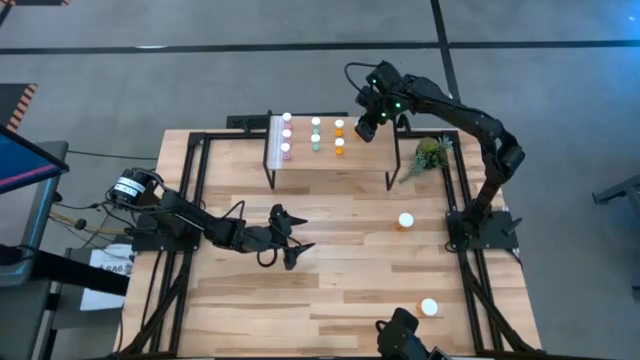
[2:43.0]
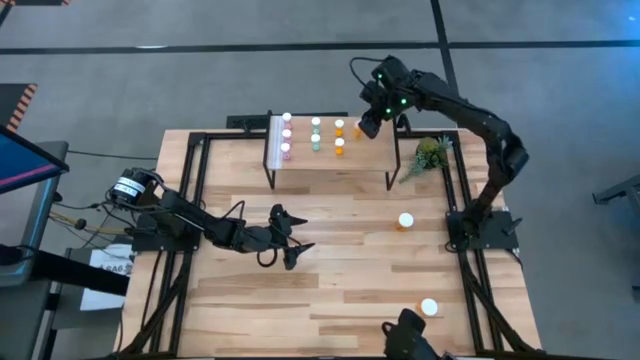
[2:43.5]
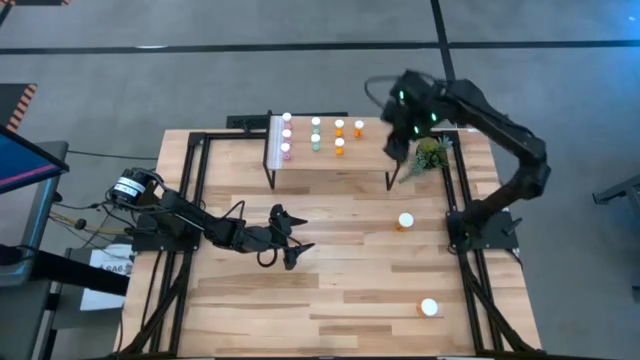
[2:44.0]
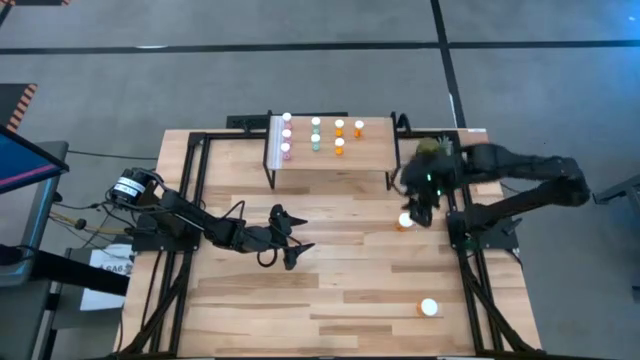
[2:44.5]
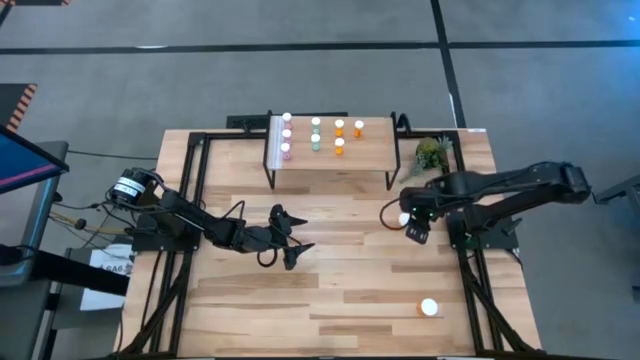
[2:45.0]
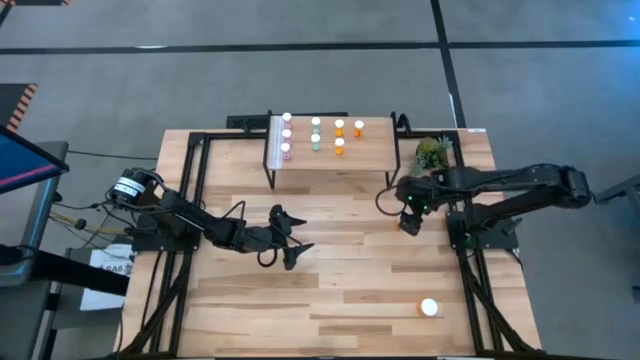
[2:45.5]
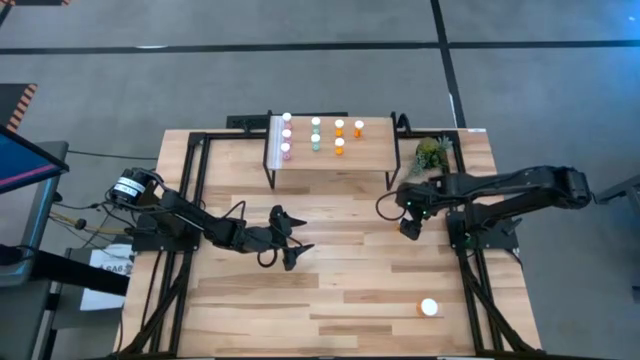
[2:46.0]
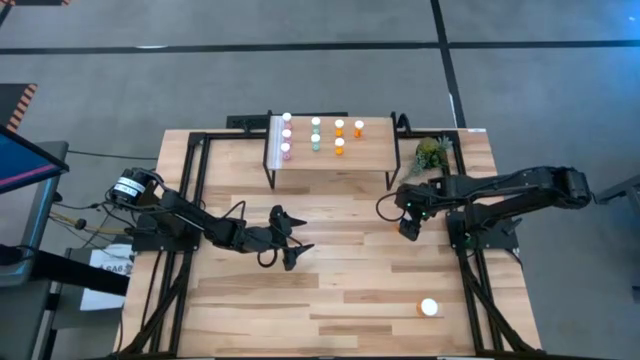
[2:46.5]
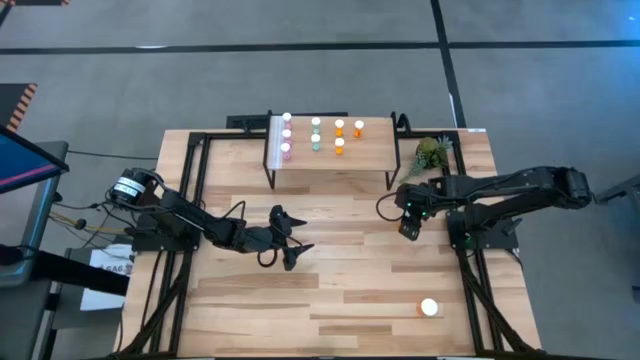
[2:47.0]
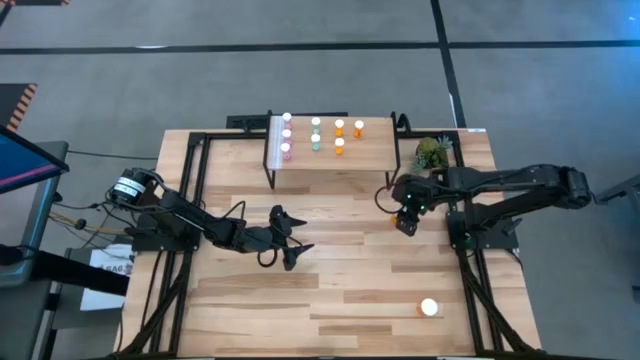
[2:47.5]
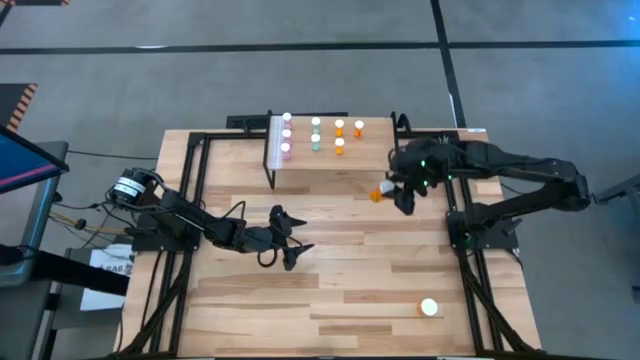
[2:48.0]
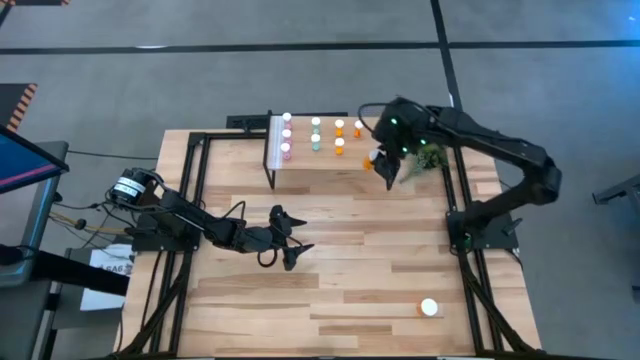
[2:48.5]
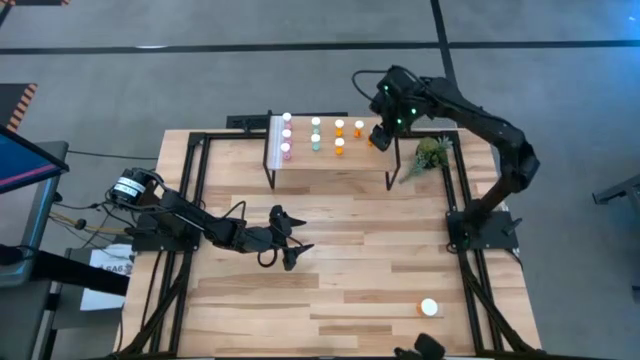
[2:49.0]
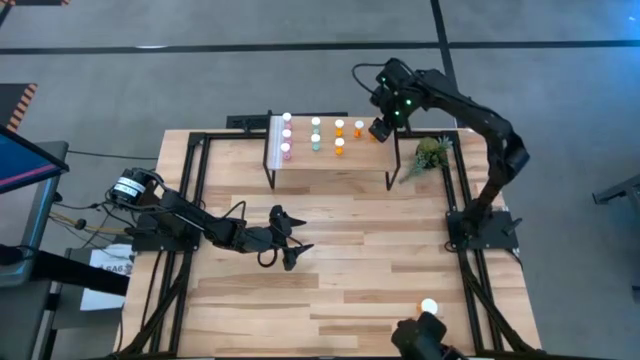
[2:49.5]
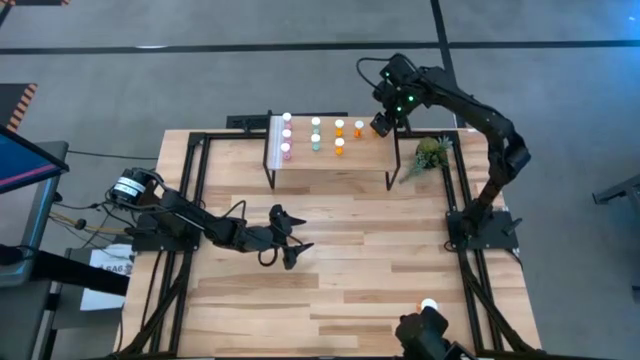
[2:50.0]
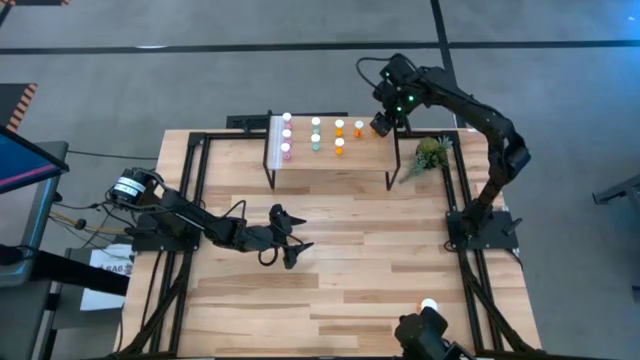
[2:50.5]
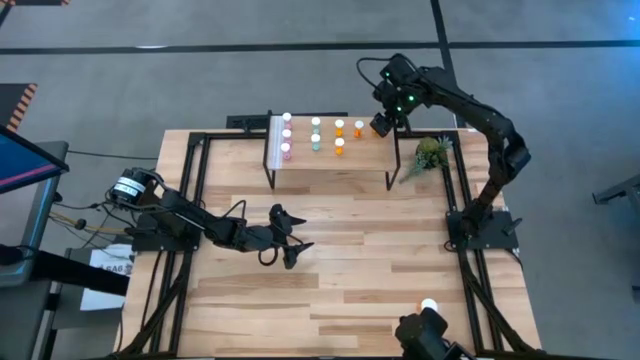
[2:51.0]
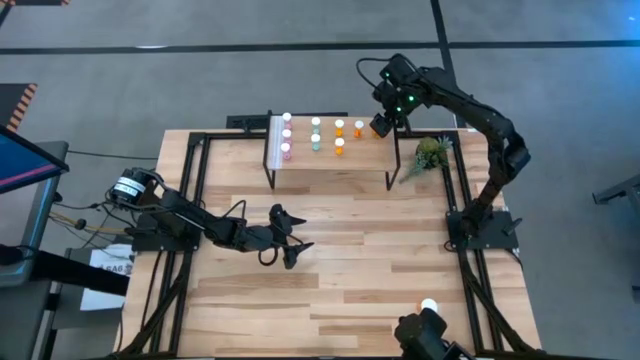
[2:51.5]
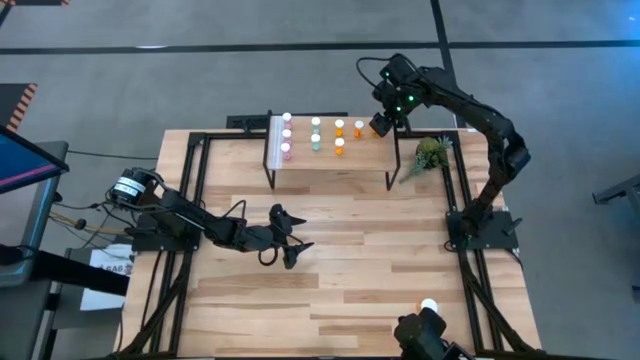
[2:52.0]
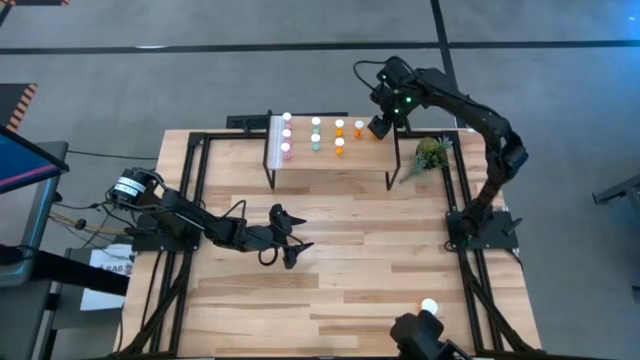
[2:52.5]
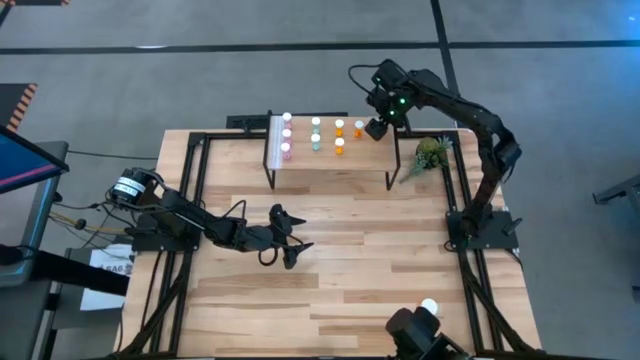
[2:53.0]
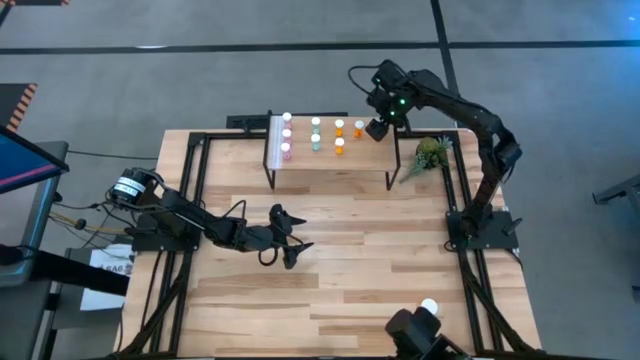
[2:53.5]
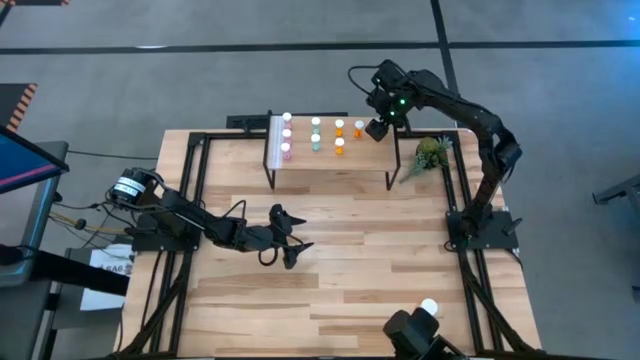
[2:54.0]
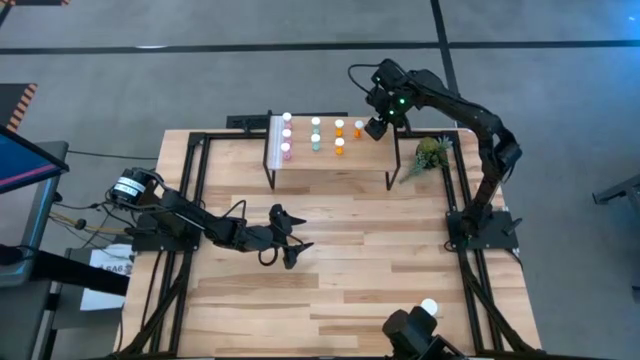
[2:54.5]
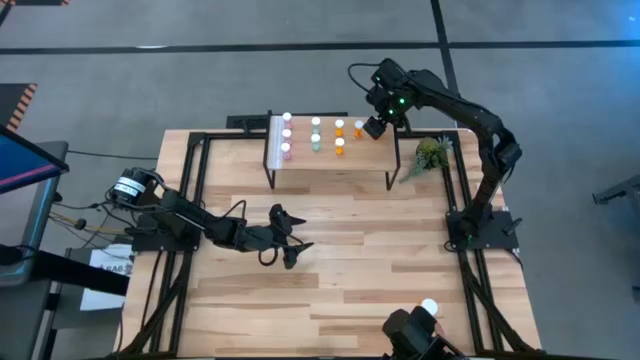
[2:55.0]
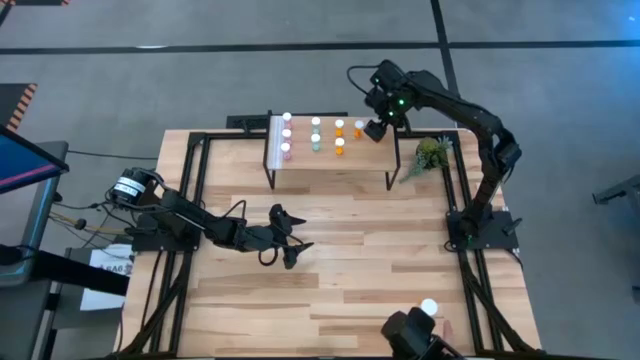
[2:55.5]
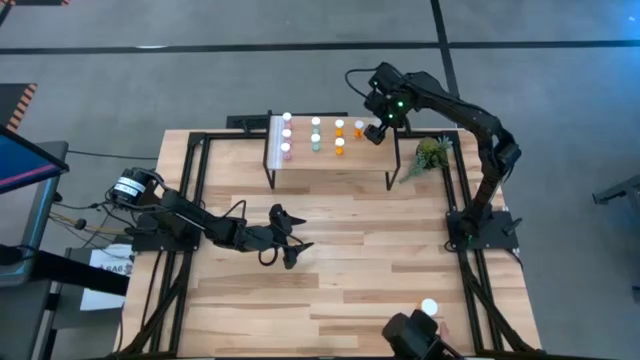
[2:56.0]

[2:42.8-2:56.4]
Task: Pick and place medicine bottles onto shelf by color
Put the top large orange pill bottle on the shelf

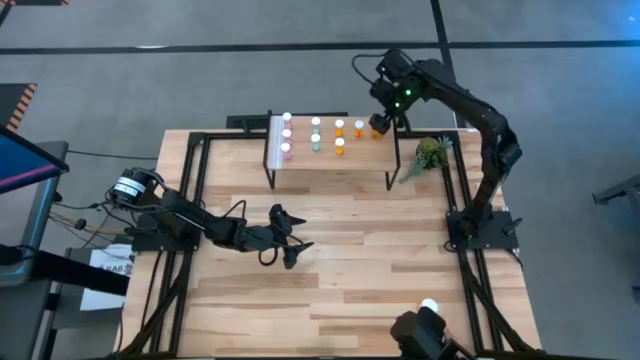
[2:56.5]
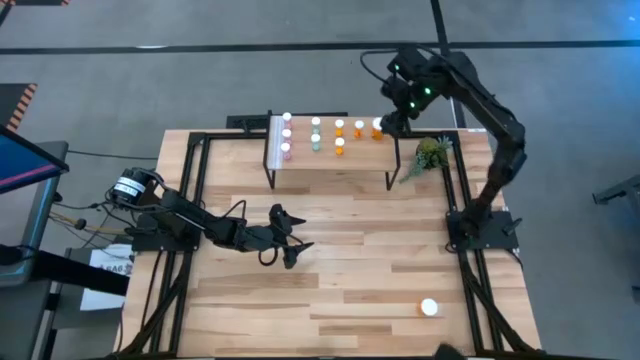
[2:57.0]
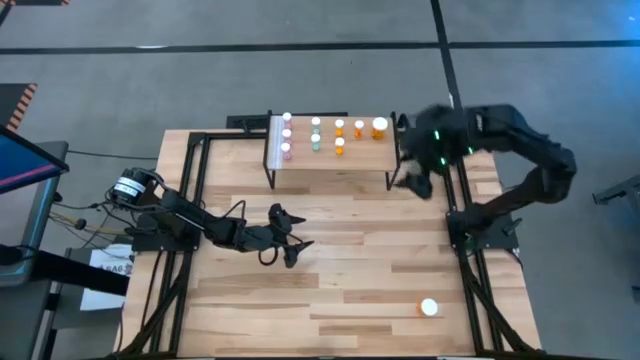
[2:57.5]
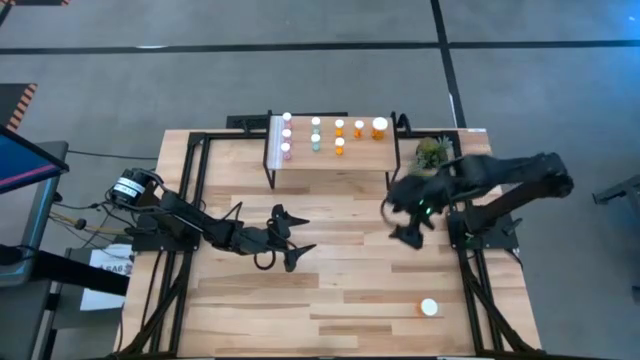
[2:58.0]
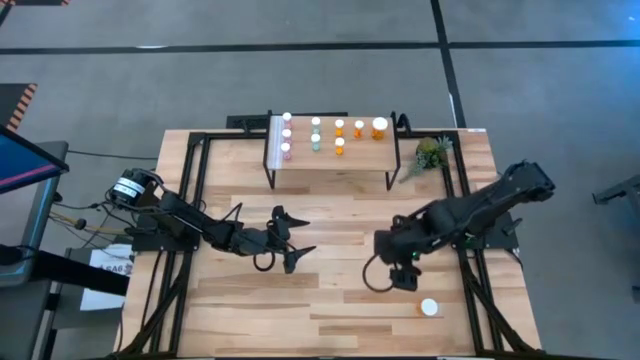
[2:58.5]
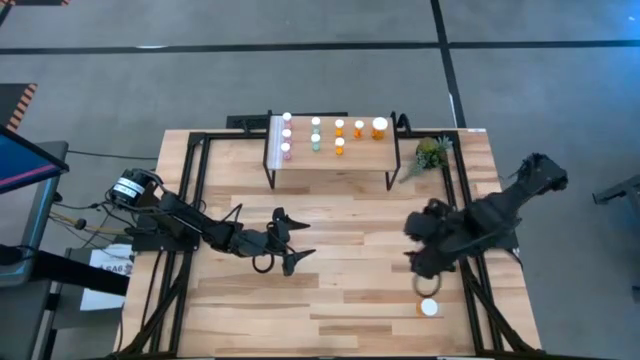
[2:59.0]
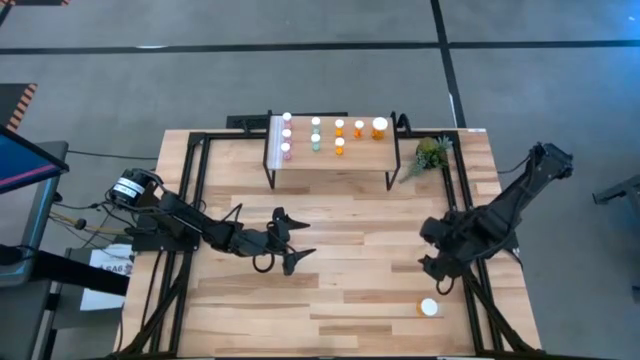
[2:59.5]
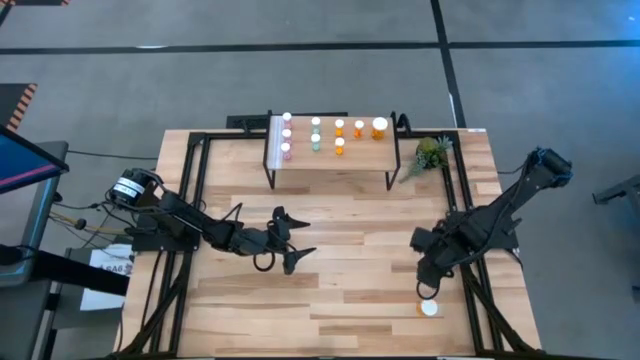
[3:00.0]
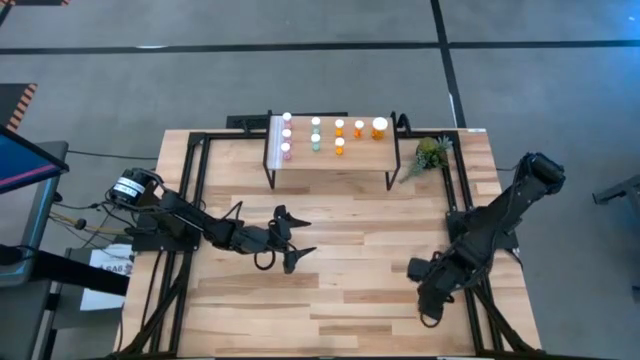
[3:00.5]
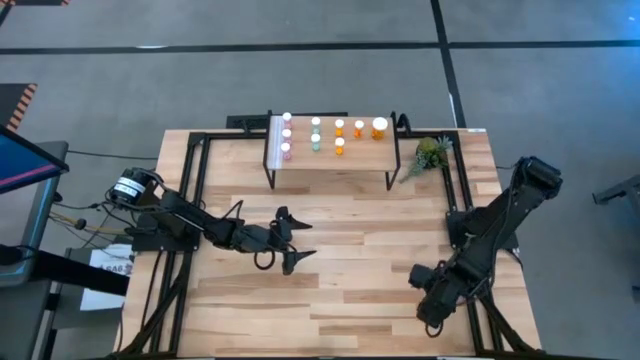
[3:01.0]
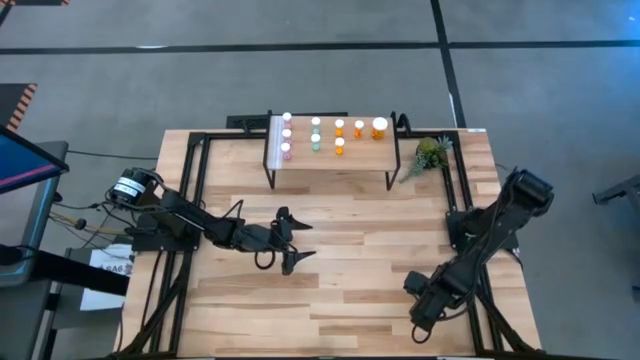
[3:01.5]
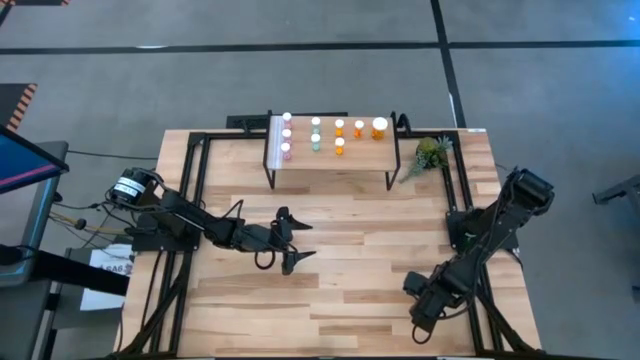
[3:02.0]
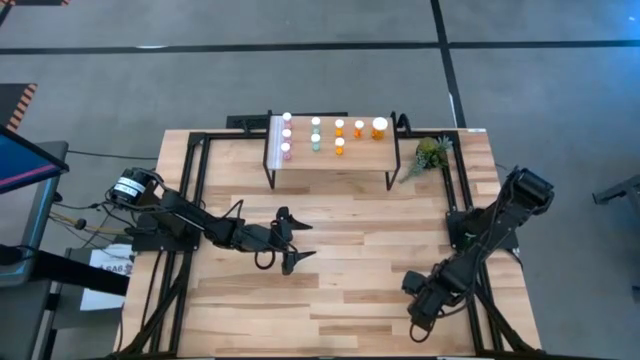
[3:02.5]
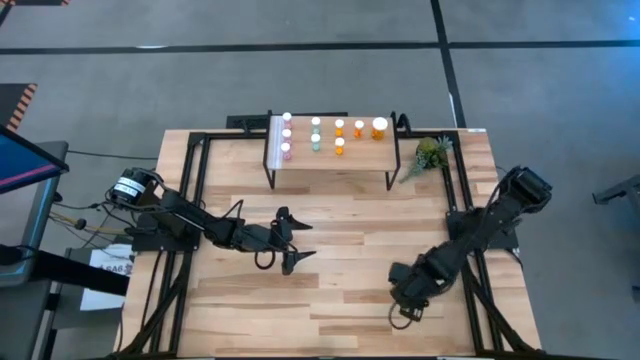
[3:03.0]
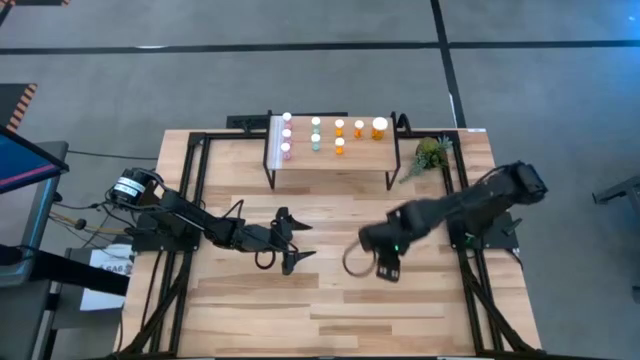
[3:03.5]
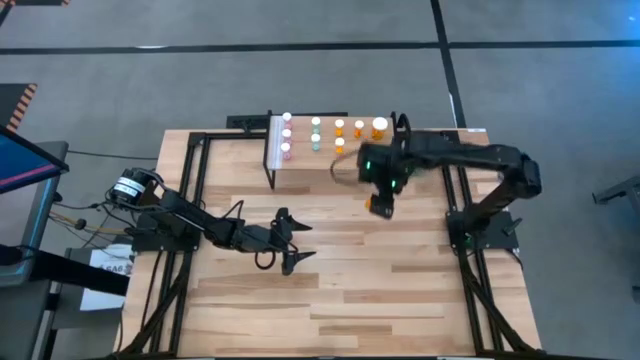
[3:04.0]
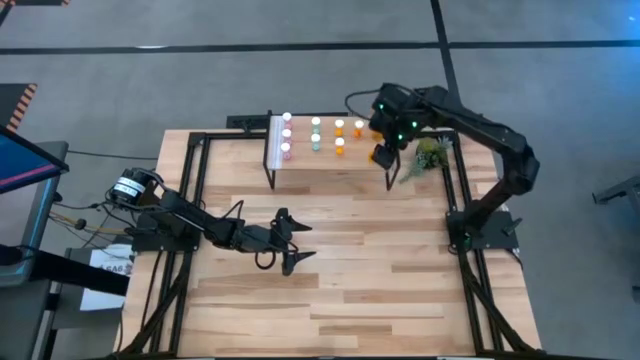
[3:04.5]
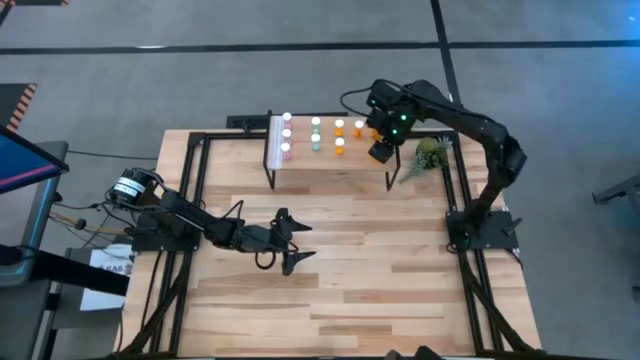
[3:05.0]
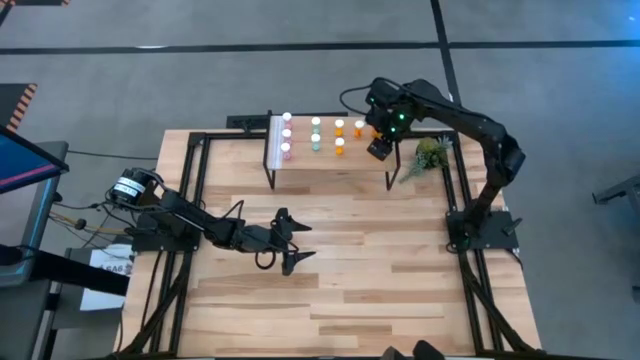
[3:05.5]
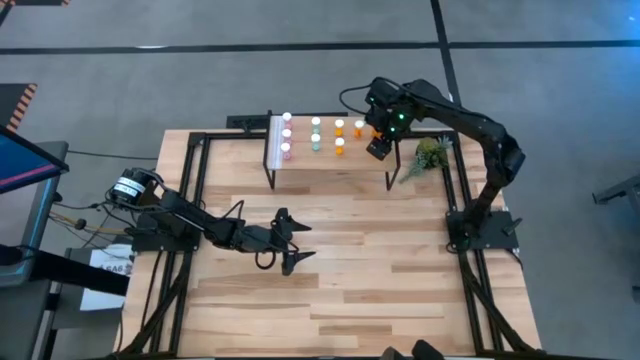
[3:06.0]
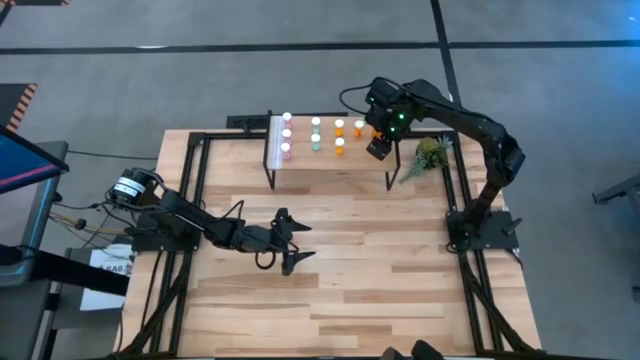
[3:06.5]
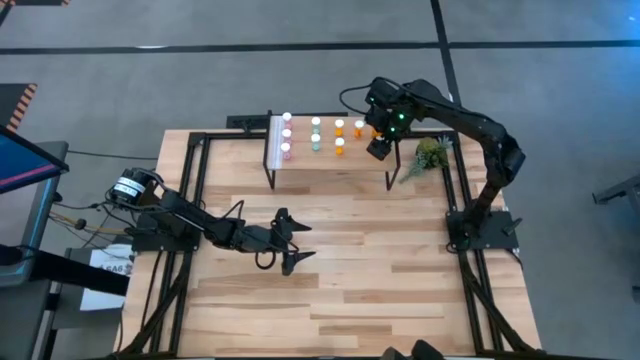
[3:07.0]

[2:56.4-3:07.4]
Put the large orange pill bottle on the shelf aligned with the other large orange pill bottle
